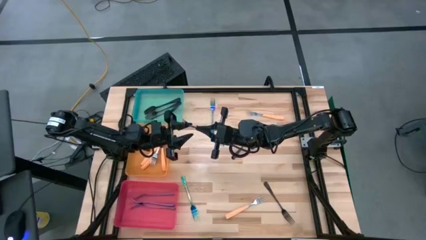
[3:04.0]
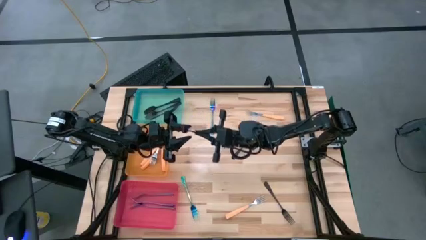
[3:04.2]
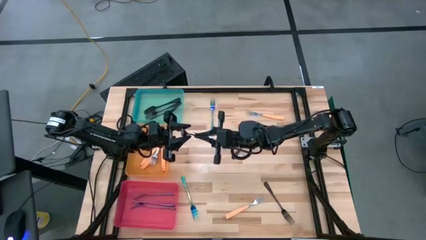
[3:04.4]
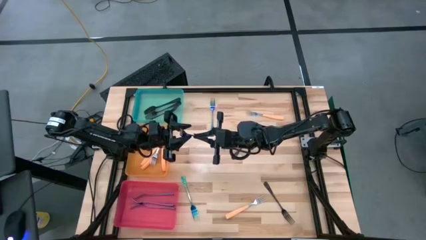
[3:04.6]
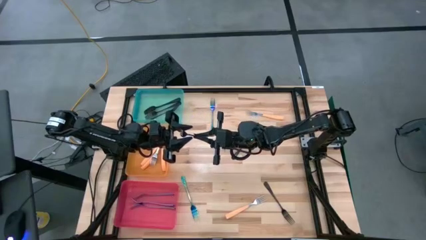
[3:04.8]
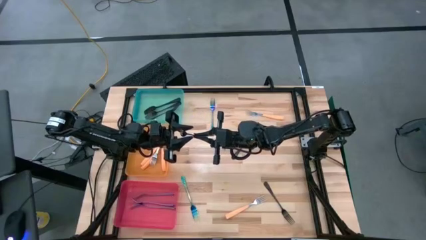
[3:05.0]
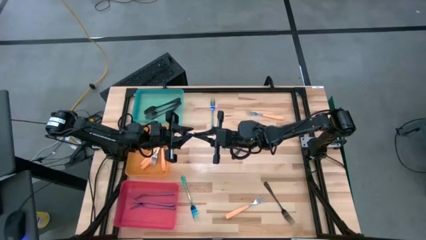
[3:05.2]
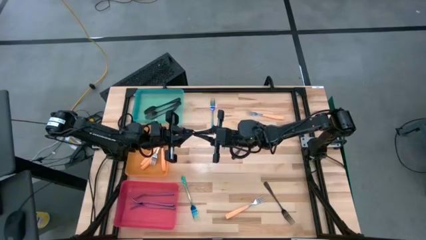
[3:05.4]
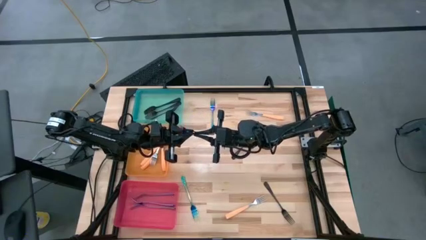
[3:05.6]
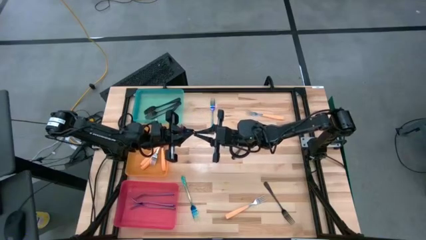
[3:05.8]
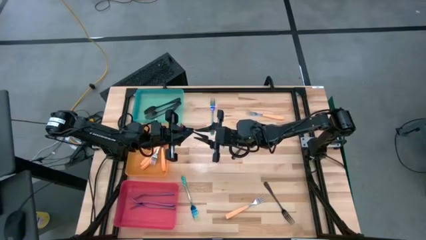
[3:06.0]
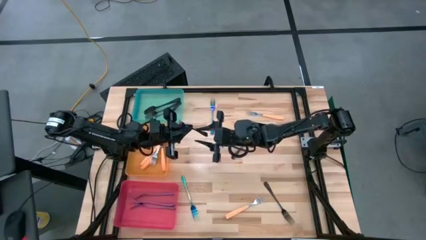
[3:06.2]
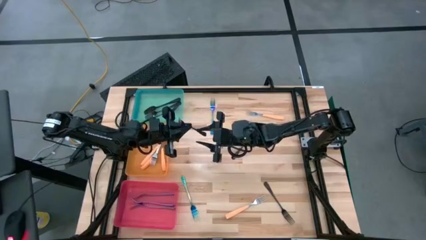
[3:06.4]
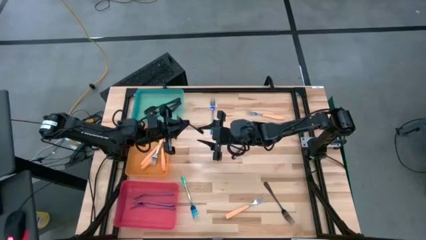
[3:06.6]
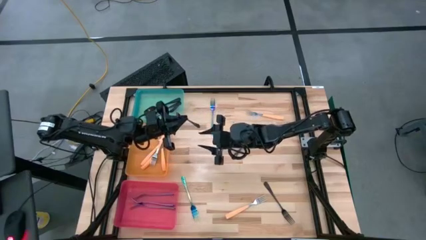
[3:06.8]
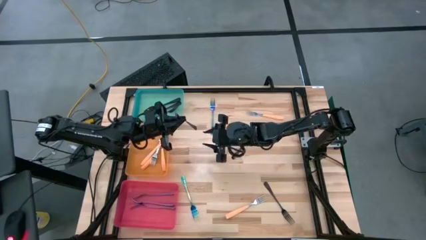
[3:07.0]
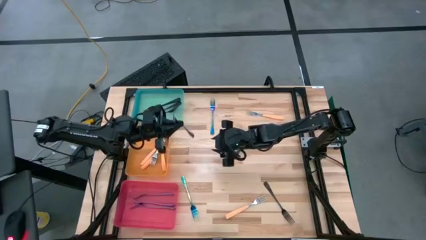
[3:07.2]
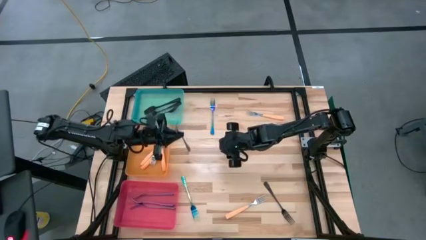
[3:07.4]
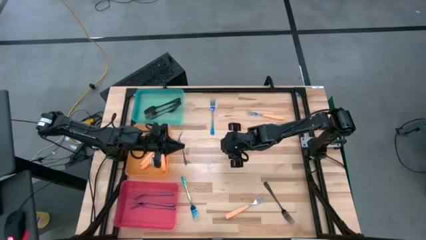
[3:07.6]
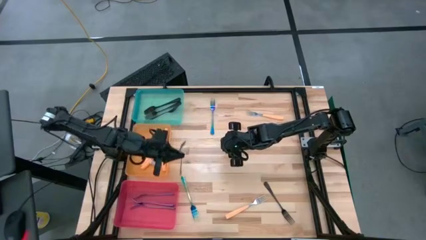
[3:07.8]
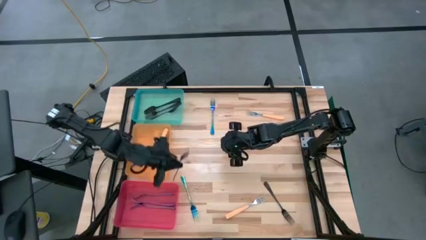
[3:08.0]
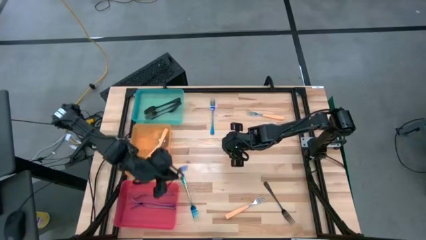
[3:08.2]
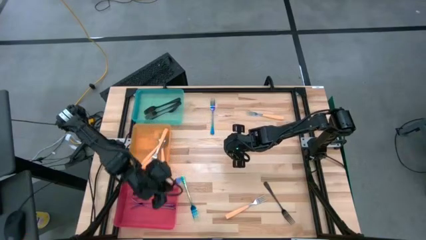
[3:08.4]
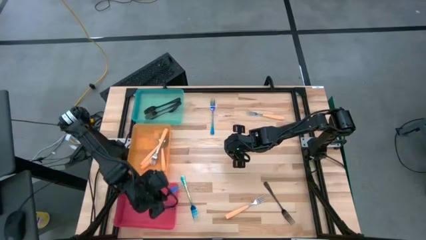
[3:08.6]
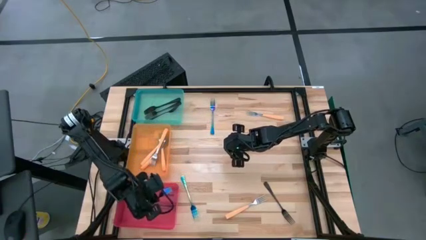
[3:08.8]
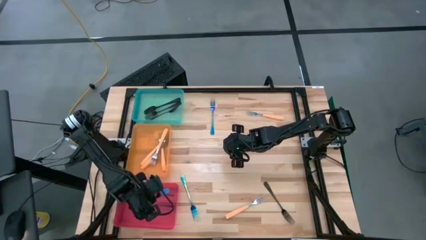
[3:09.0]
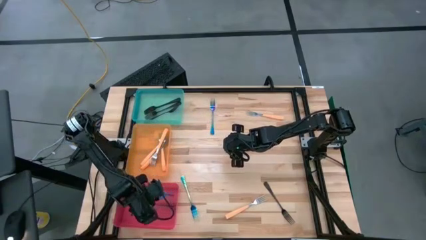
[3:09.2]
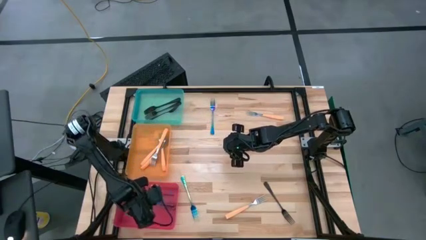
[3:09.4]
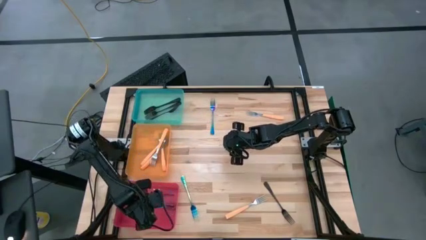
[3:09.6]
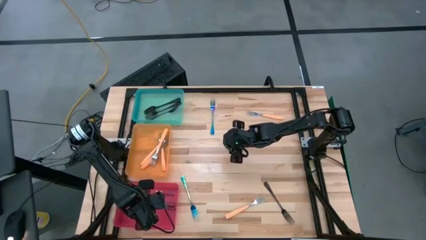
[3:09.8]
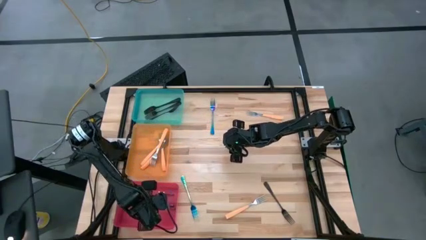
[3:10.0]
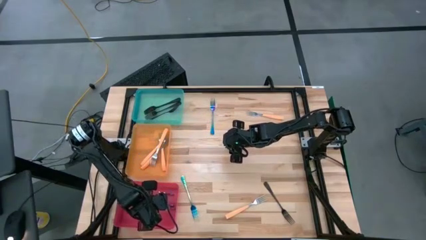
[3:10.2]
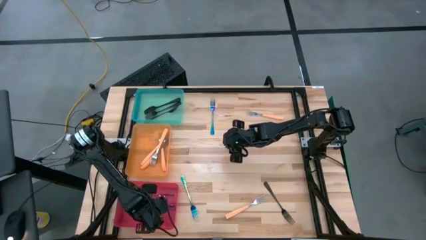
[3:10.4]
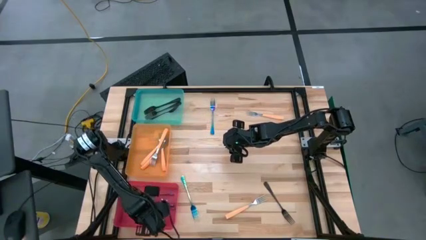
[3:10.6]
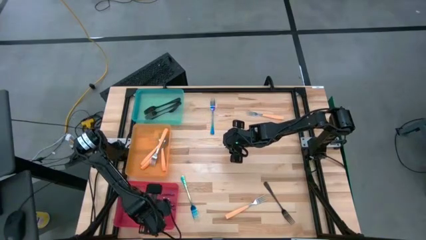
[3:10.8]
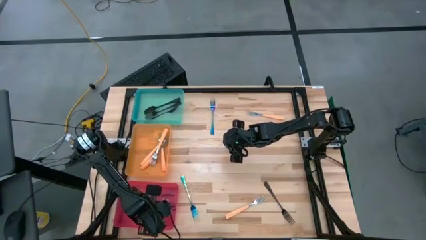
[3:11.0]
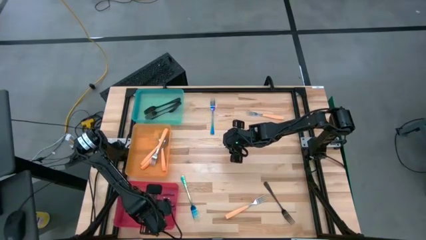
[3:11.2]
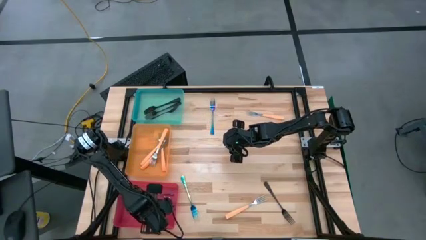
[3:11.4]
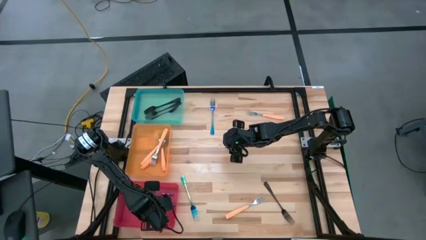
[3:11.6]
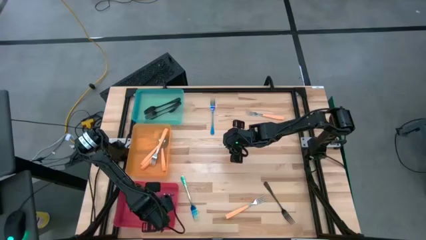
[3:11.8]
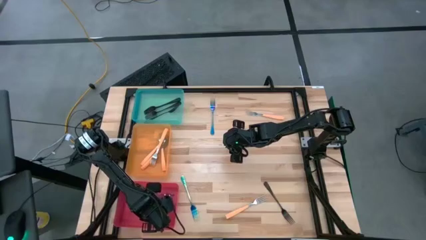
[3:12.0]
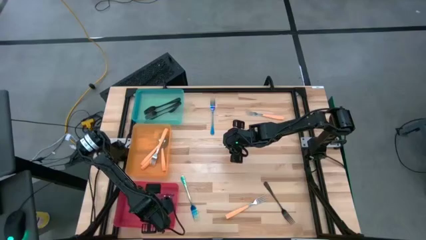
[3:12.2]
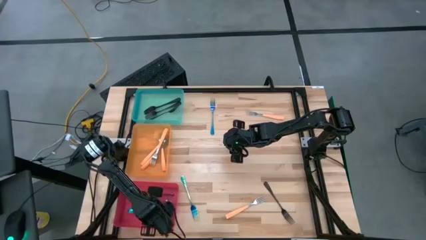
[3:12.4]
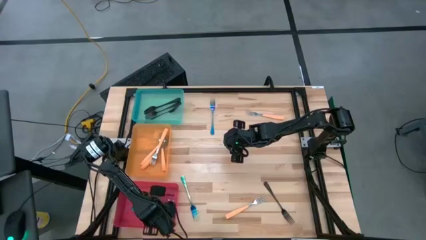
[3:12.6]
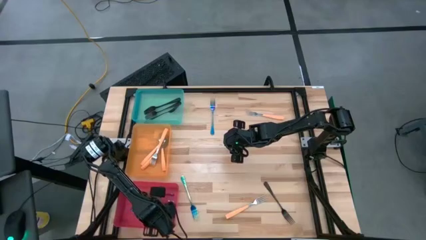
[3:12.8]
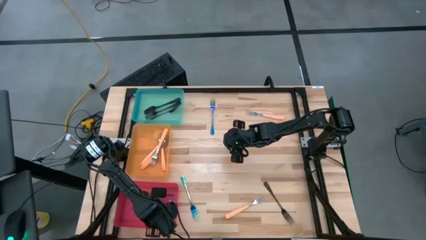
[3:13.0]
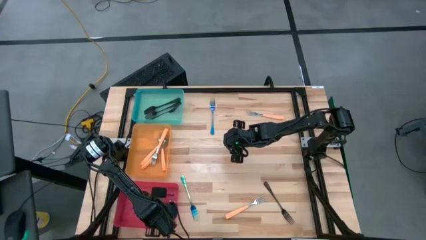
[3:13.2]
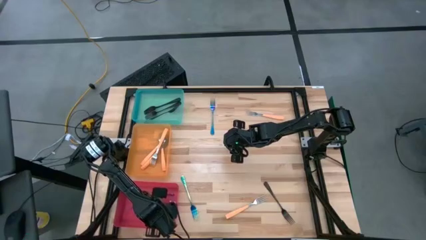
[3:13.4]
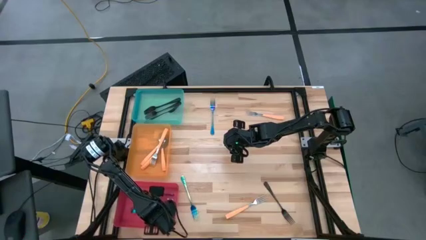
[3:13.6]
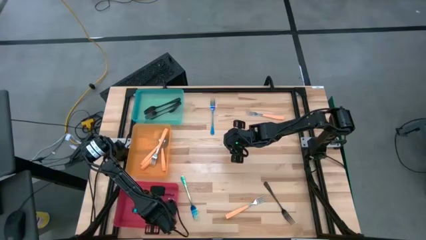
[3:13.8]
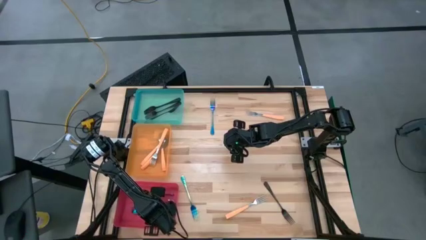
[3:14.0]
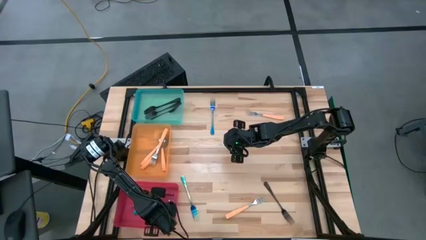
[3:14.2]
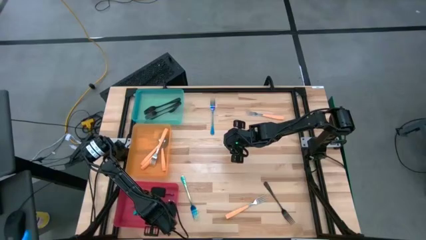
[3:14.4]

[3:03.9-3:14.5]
Task: Sort silverware by color (type)
Put the blue fork into the red bin
